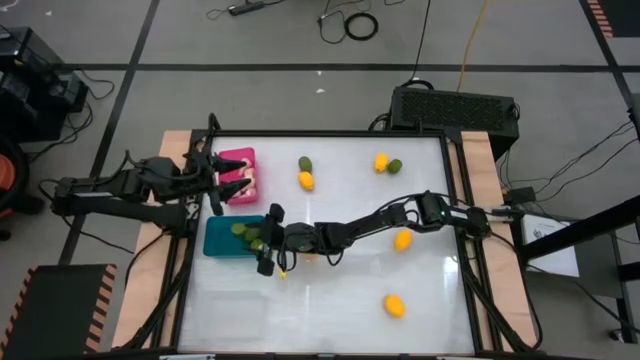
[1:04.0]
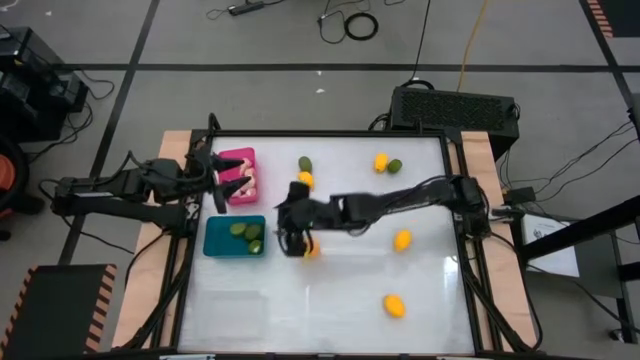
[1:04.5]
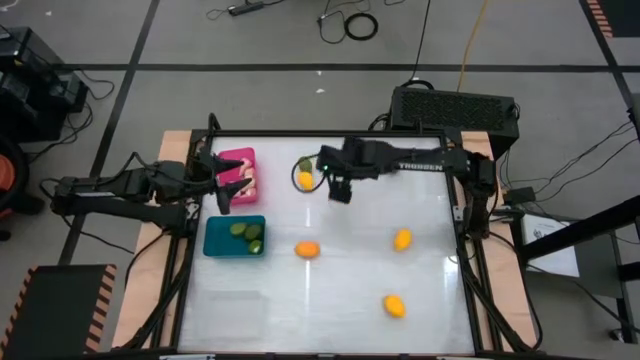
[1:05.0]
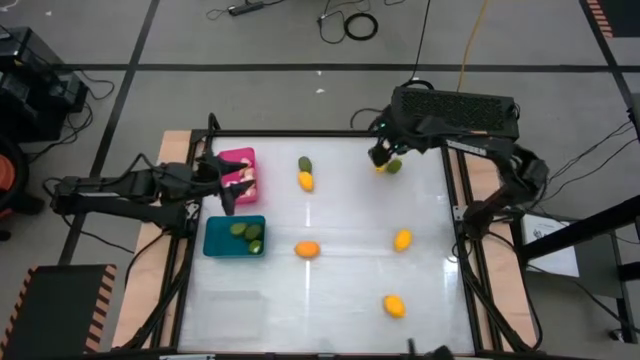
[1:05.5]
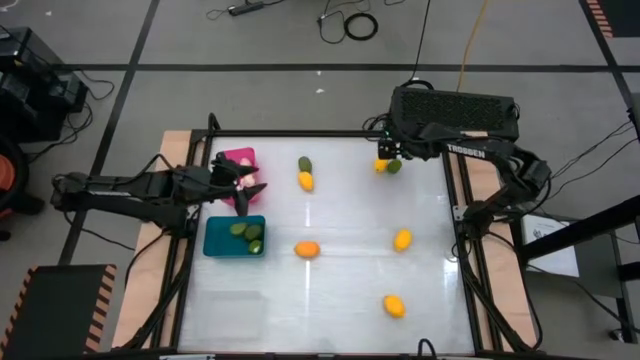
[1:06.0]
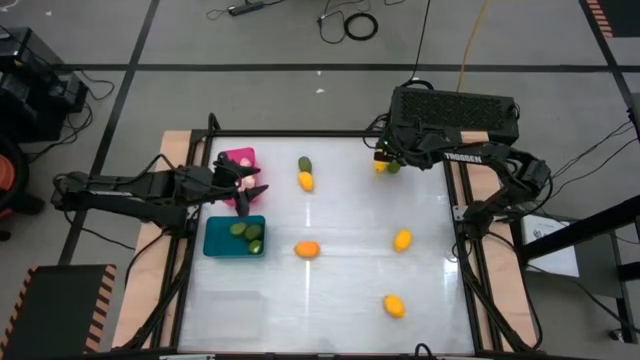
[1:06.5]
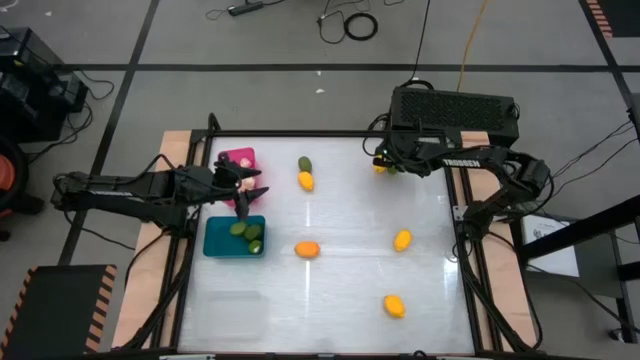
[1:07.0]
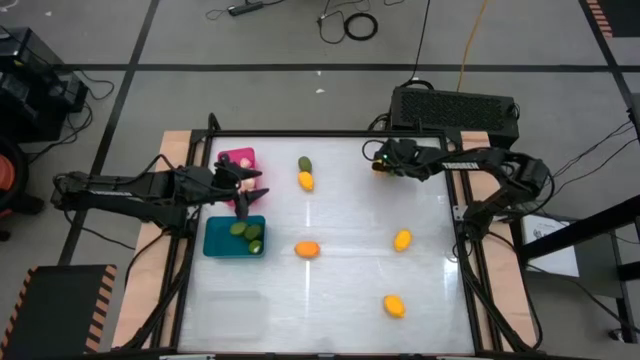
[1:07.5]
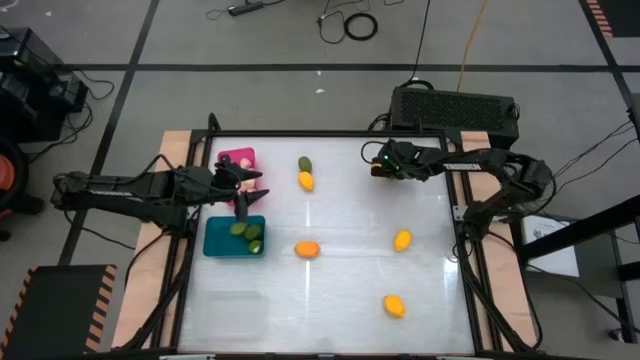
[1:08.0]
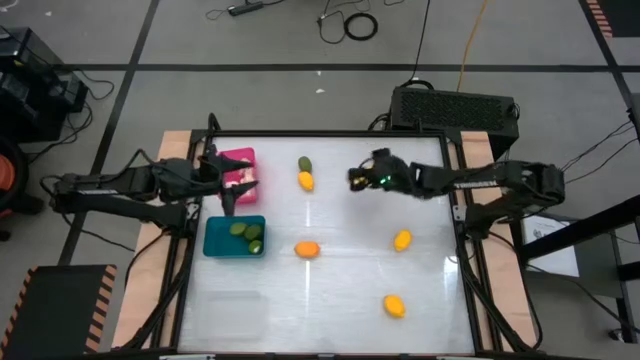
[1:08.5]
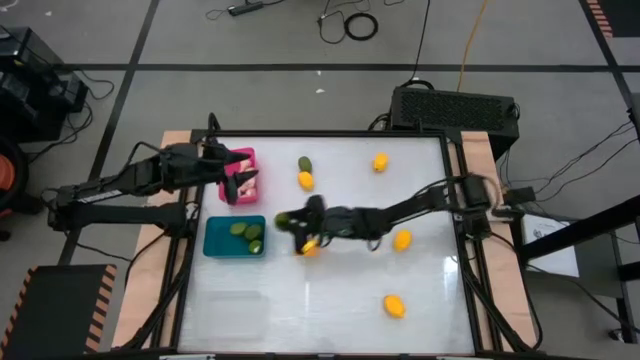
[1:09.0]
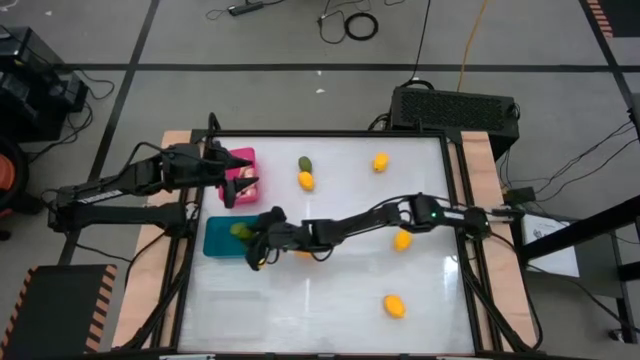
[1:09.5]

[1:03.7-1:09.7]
Task: Sort produce into baskets
Put the green lime into the blue bin

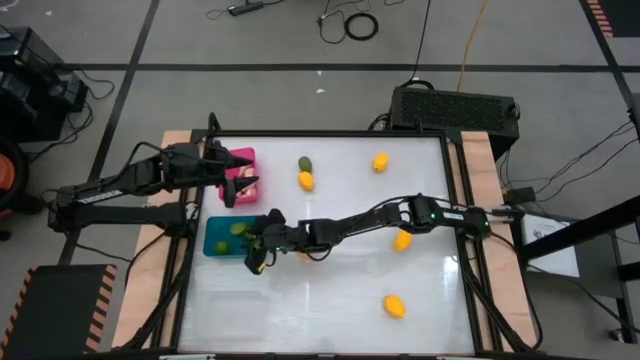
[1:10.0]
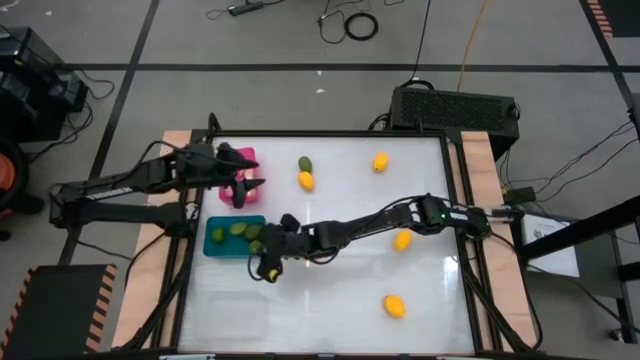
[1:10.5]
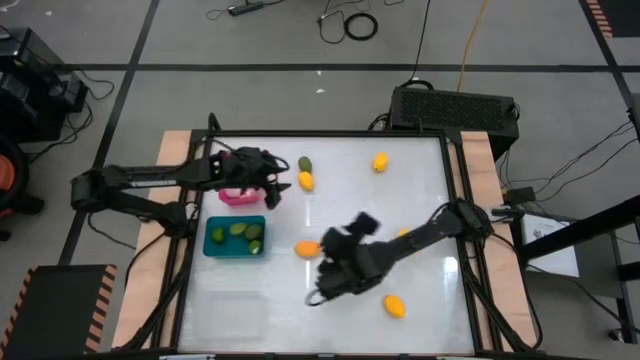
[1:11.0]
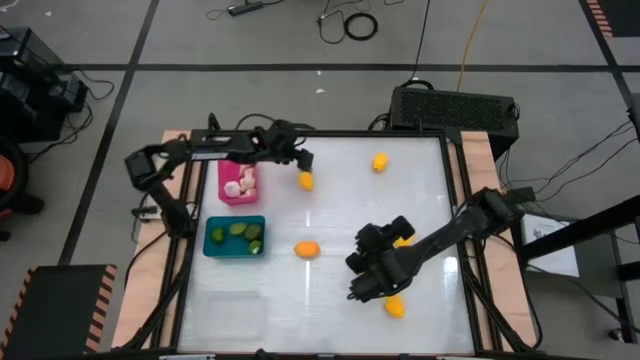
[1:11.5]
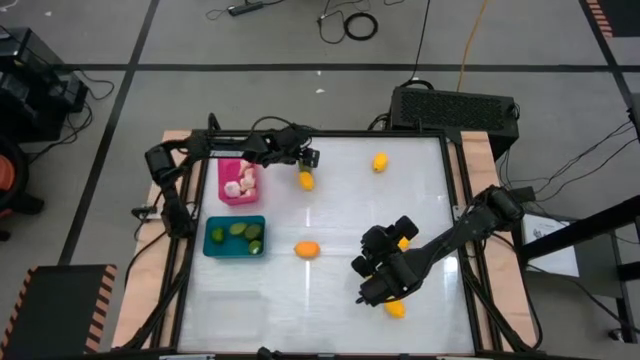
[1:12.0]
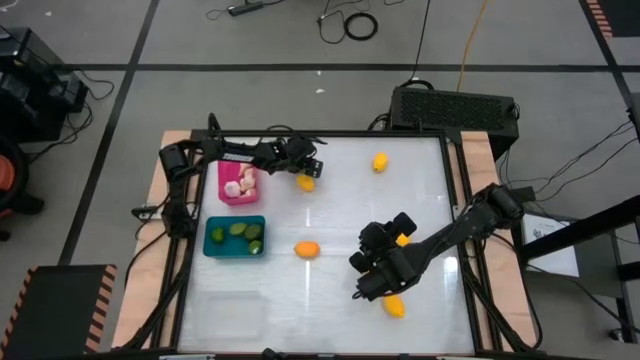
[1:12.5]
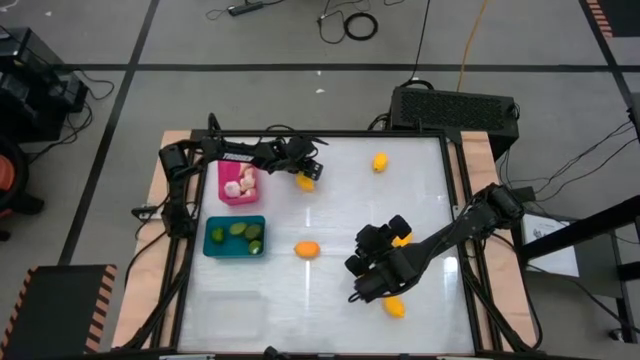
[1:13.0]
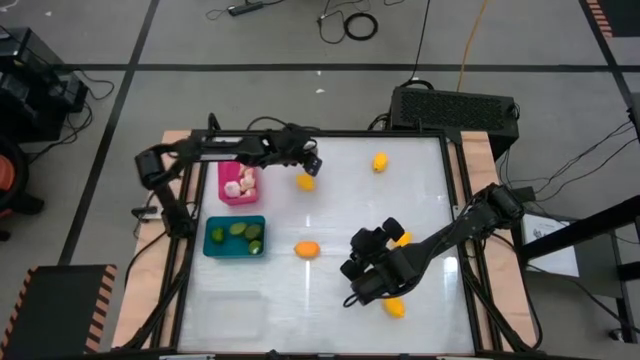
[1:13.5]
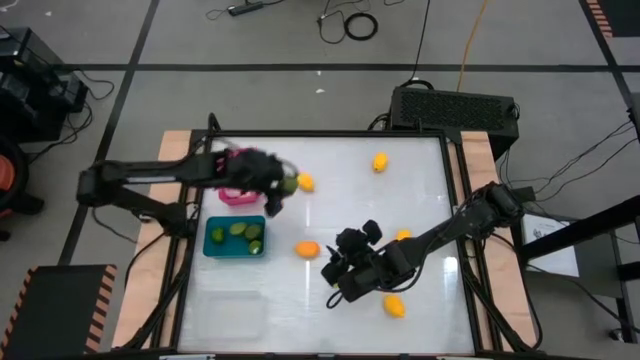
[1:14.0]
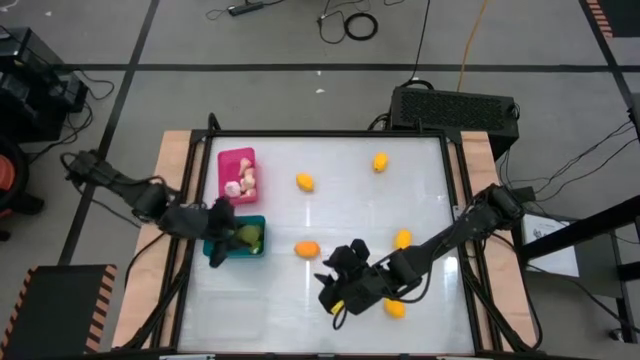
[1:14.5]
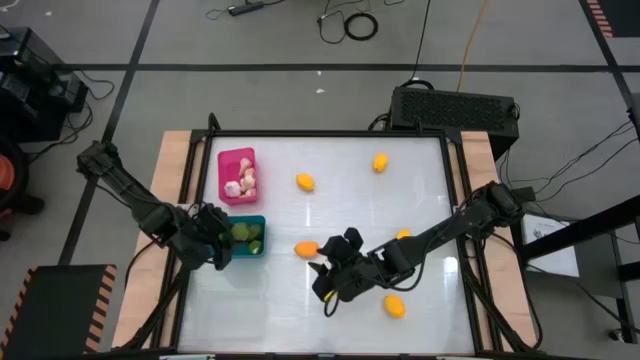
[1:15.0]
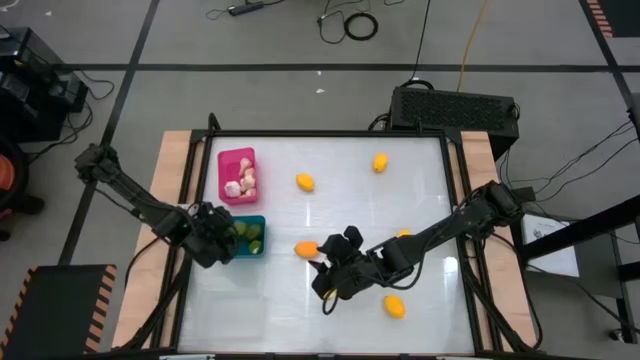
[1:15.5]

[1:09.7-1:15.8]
Put the green lime into the blue bin

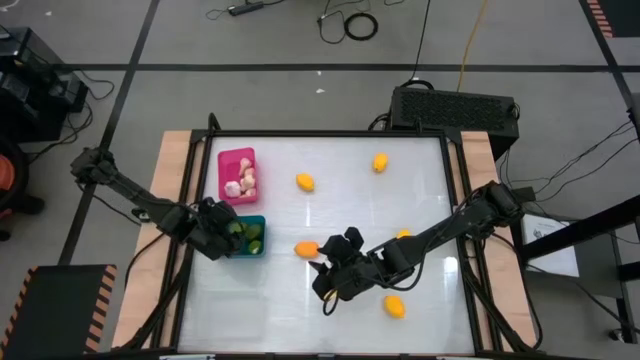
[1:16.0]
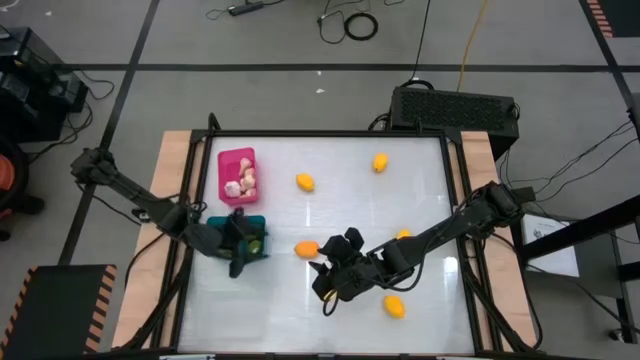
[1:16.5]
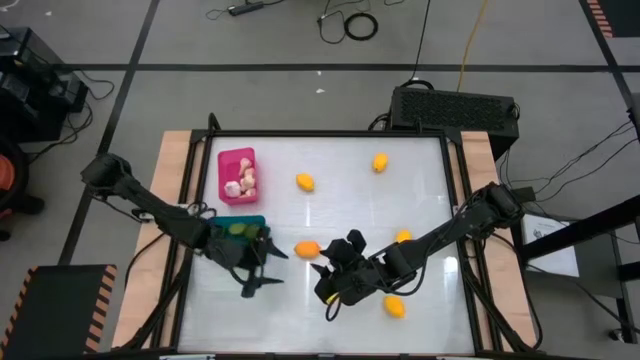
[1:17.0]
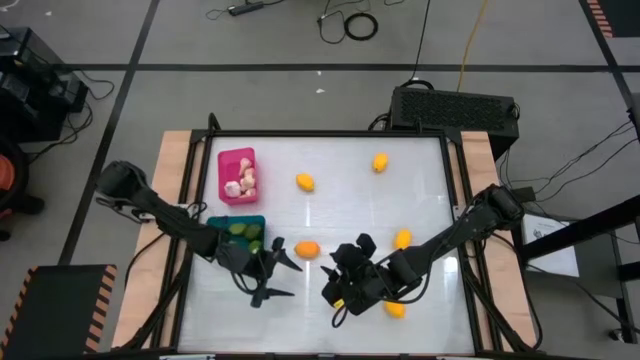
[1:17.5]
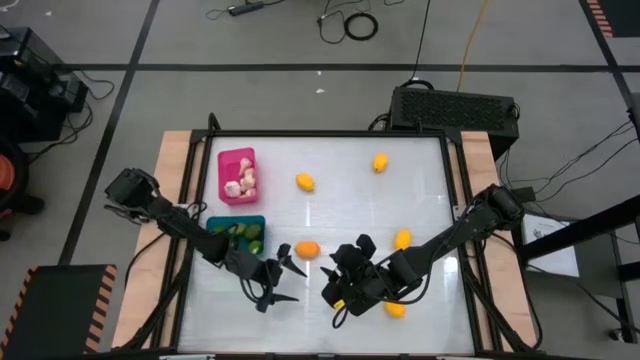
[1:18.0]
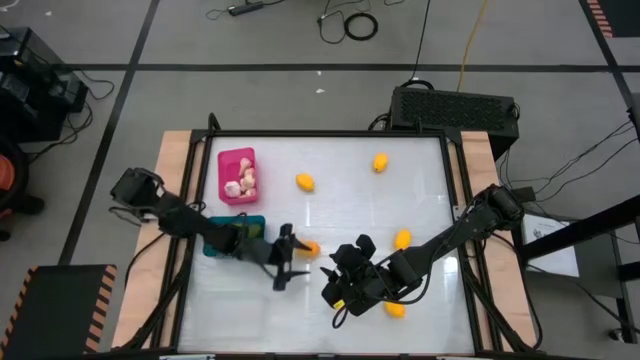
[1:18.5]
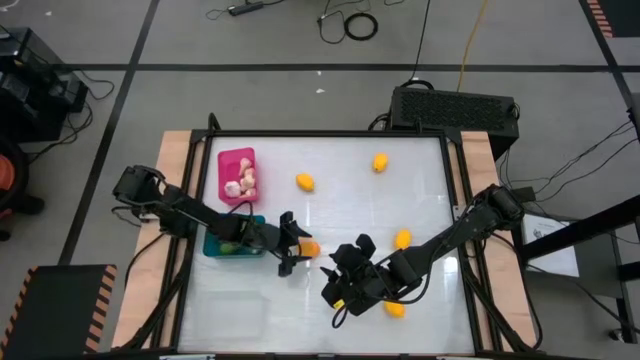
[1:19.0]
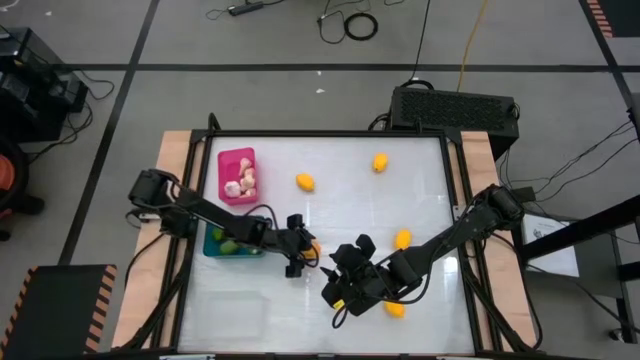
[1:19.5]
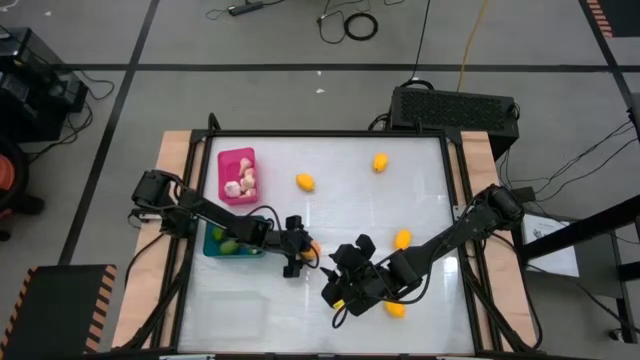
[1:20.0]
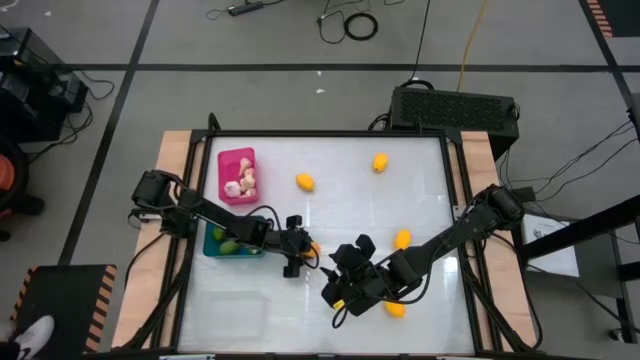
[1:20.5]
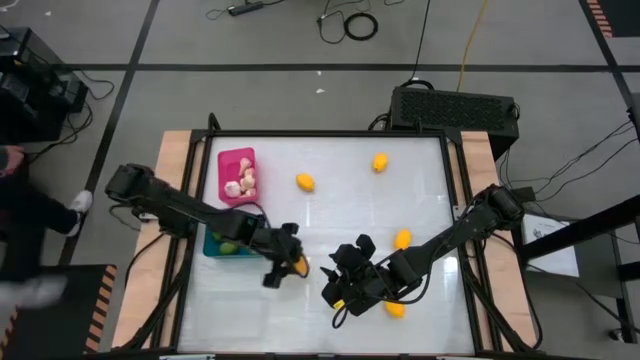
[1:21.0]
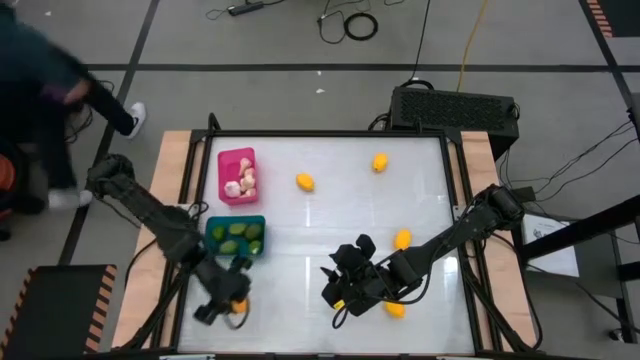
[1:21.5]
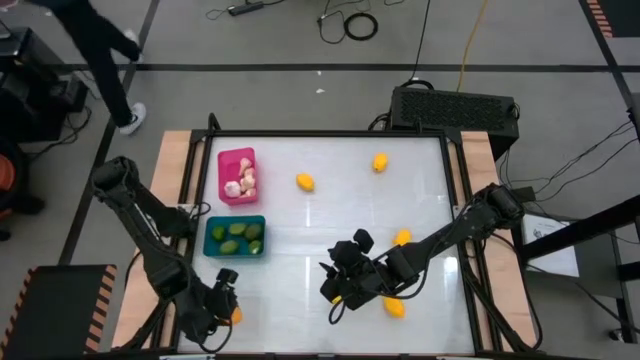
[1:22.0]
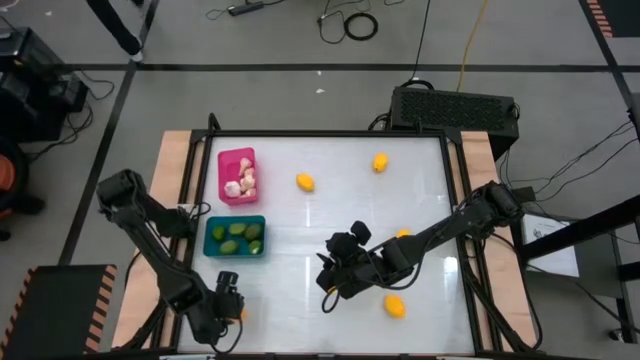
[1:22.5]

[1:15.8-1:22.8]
Put the yellow lime into the transparent bin
